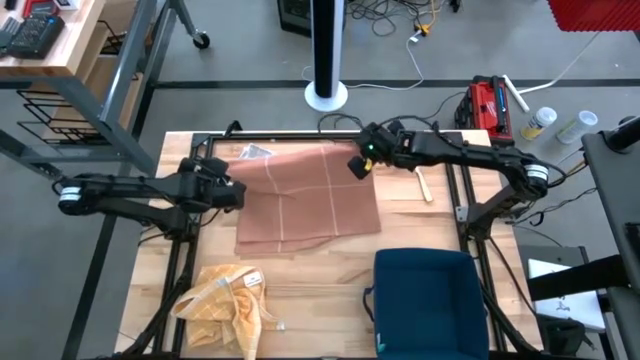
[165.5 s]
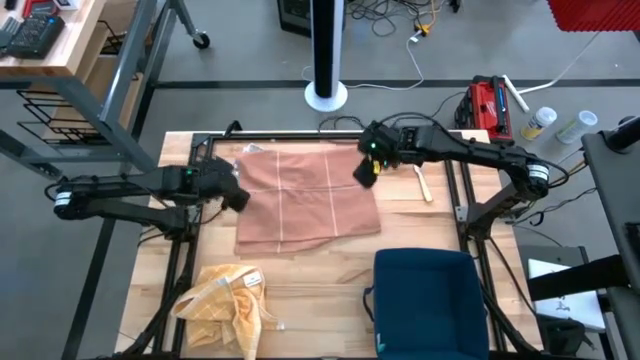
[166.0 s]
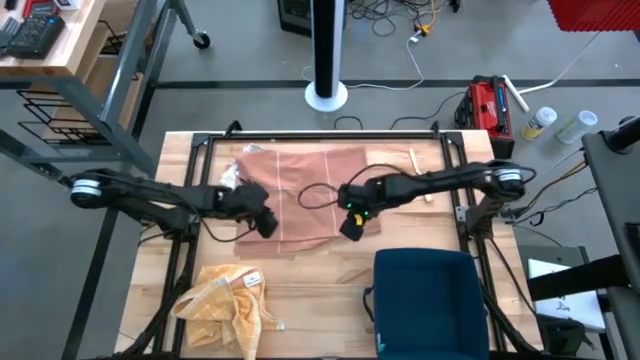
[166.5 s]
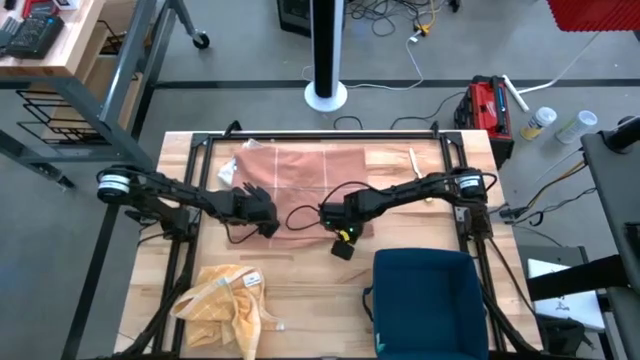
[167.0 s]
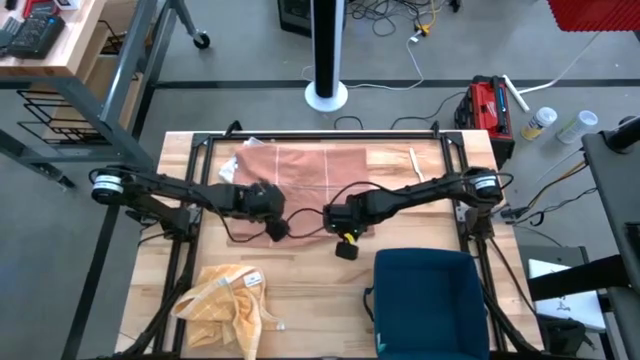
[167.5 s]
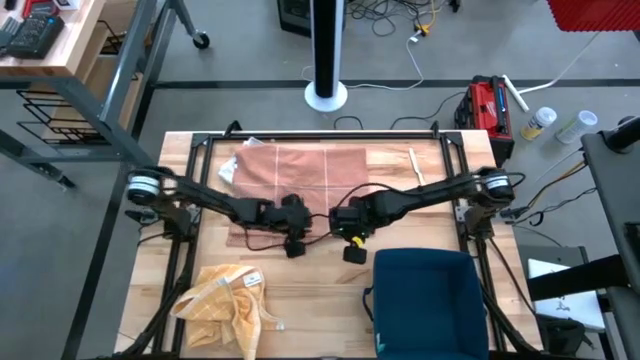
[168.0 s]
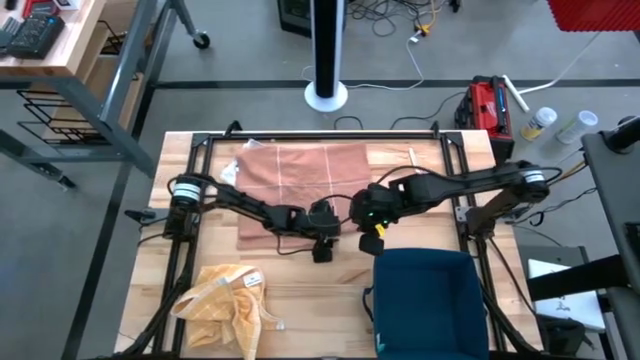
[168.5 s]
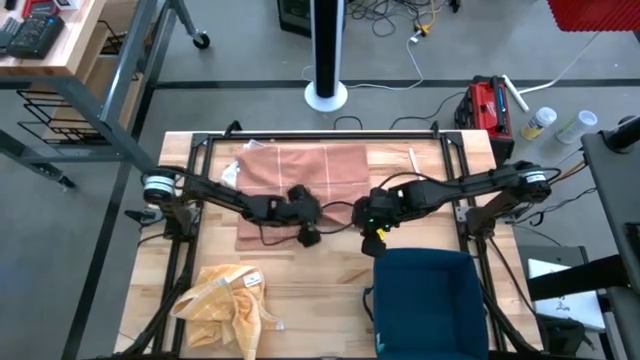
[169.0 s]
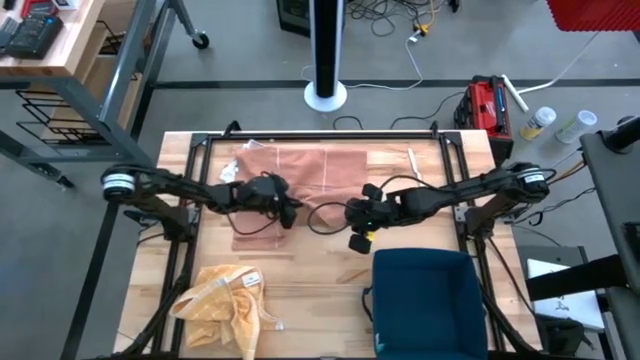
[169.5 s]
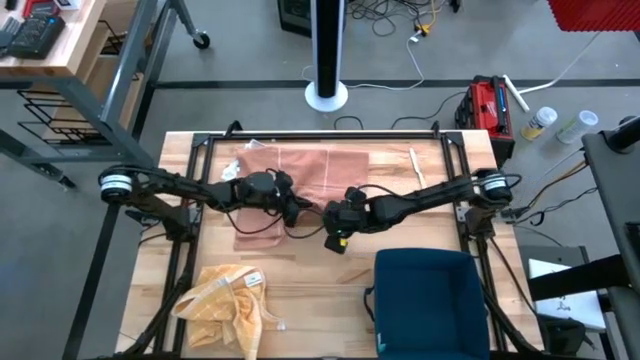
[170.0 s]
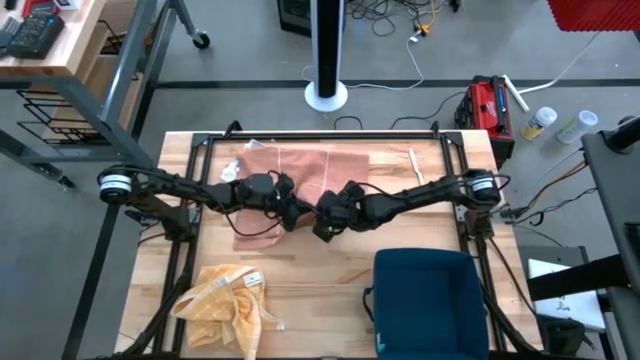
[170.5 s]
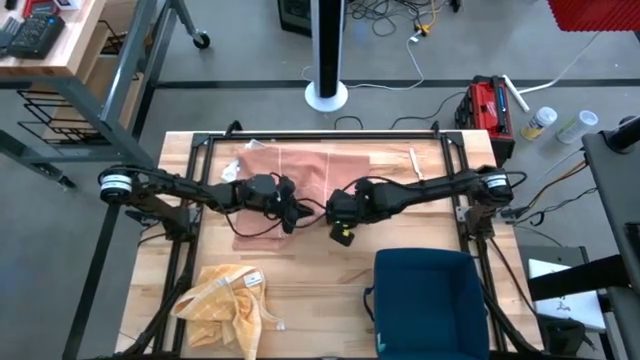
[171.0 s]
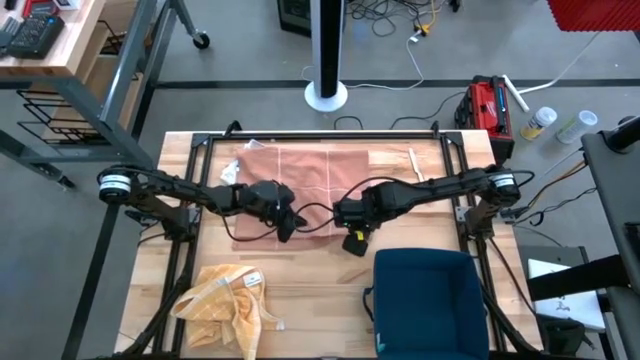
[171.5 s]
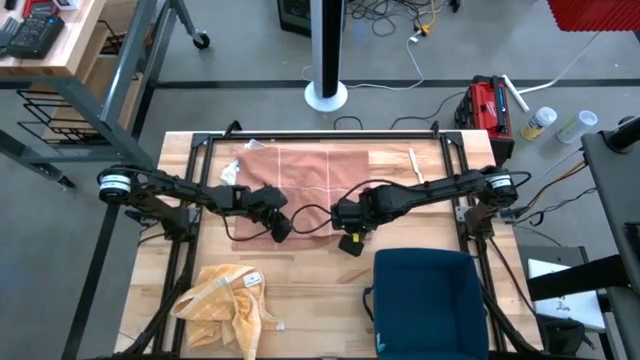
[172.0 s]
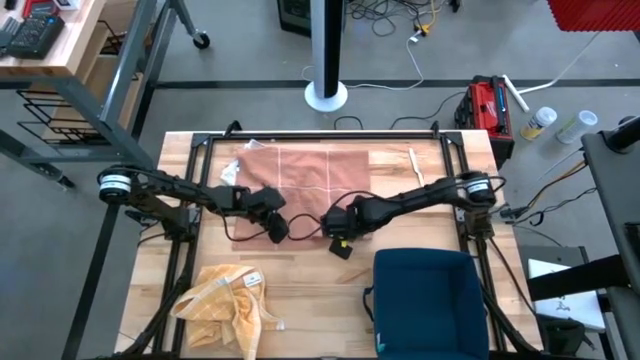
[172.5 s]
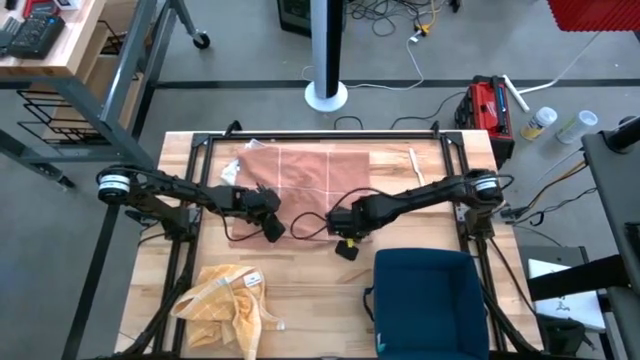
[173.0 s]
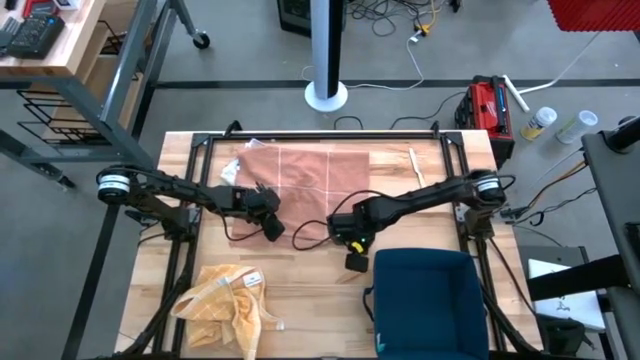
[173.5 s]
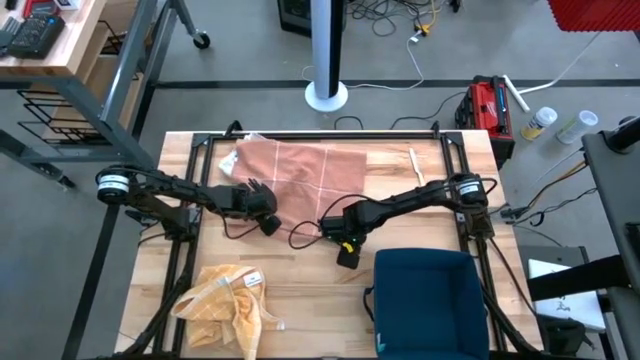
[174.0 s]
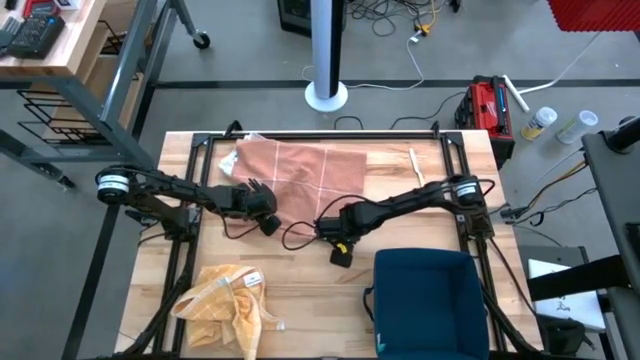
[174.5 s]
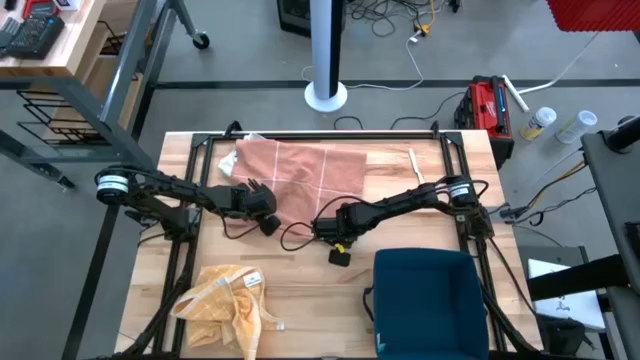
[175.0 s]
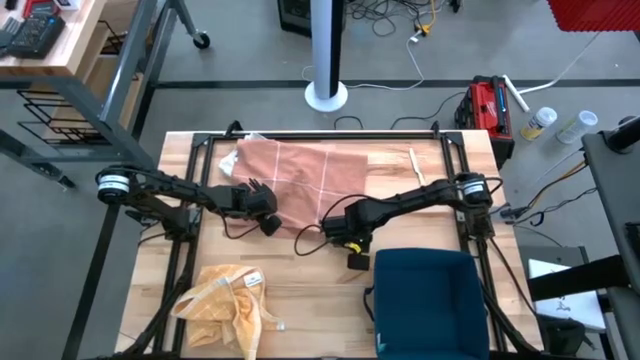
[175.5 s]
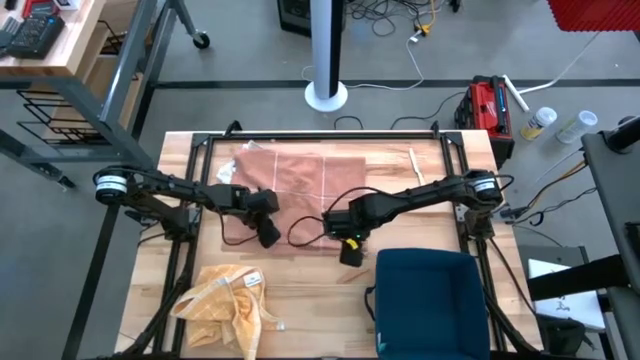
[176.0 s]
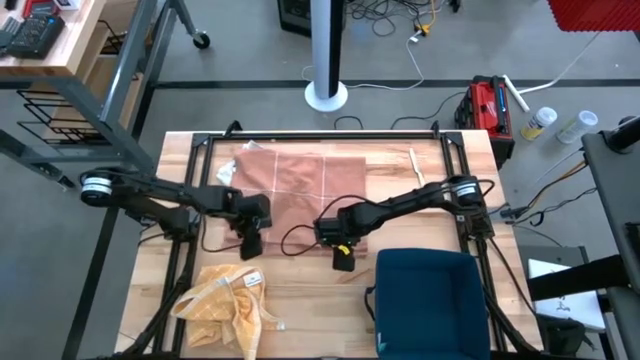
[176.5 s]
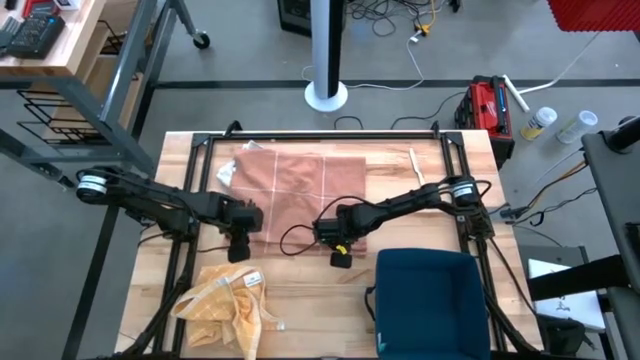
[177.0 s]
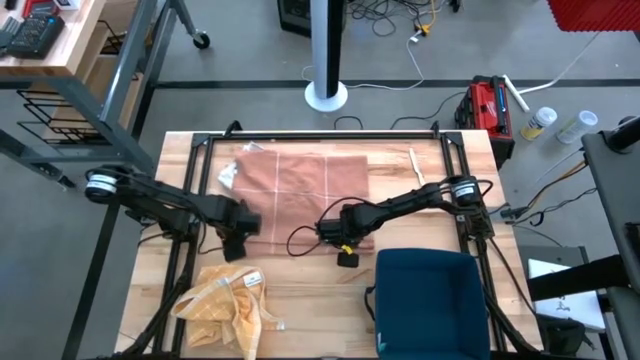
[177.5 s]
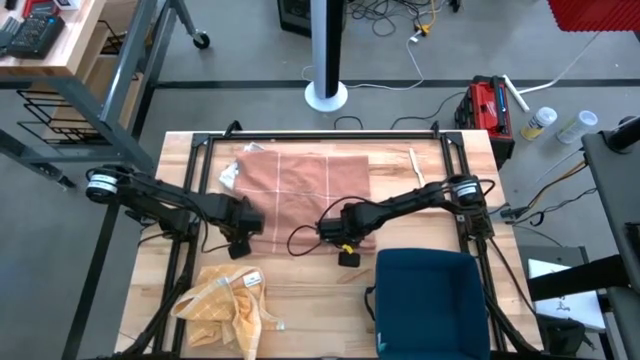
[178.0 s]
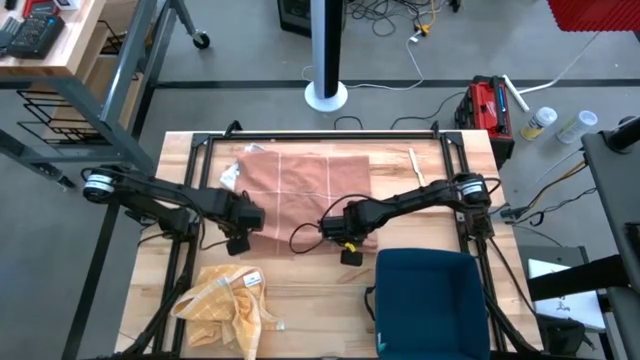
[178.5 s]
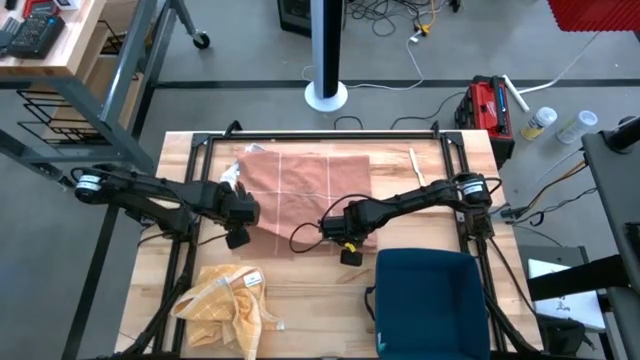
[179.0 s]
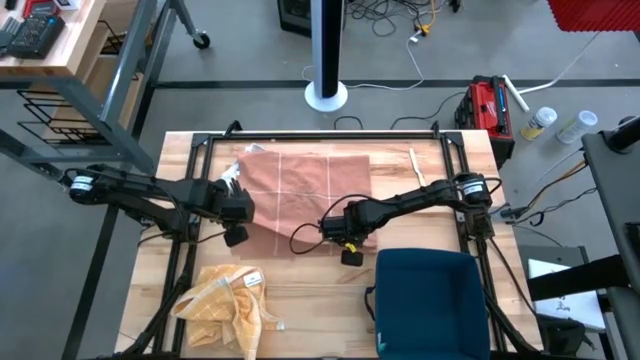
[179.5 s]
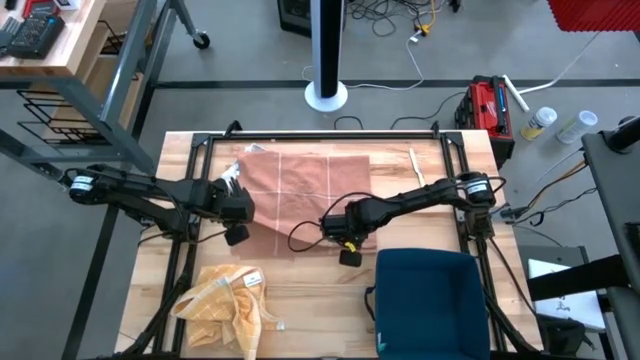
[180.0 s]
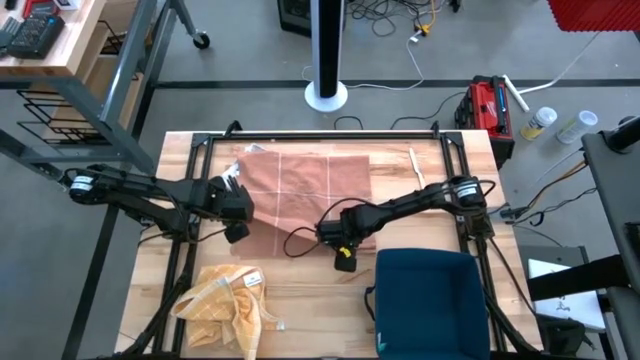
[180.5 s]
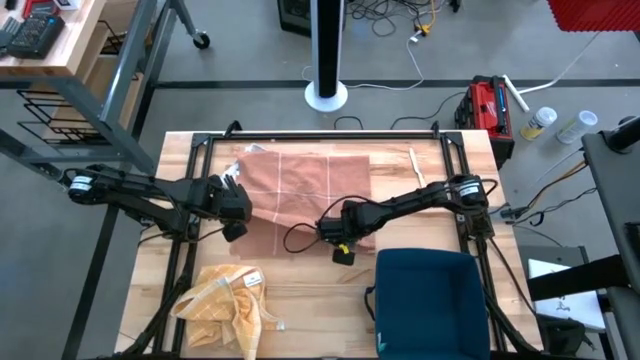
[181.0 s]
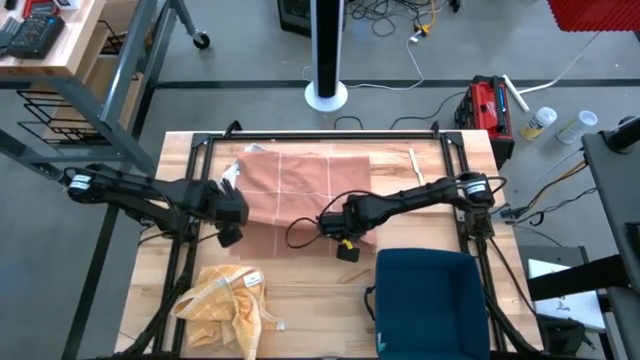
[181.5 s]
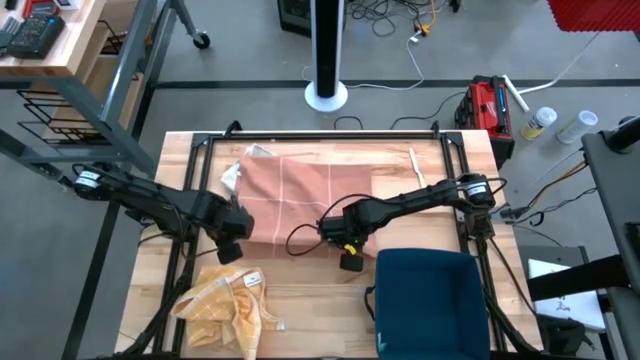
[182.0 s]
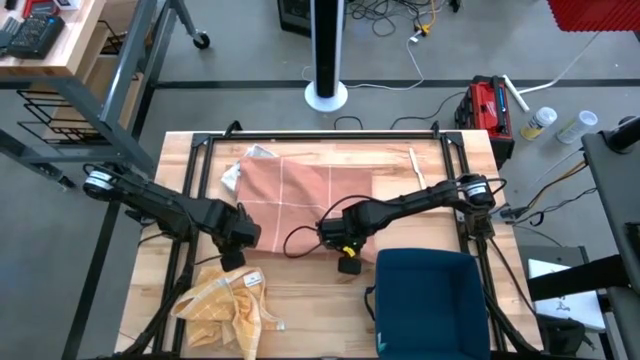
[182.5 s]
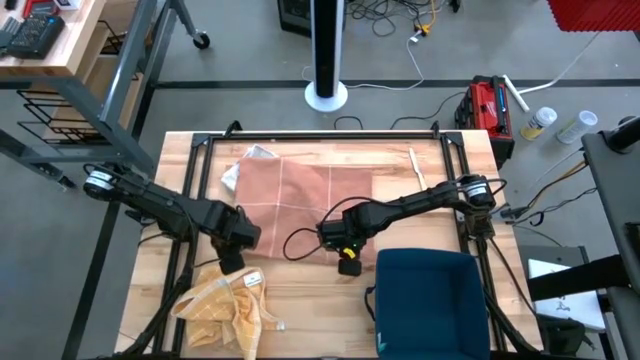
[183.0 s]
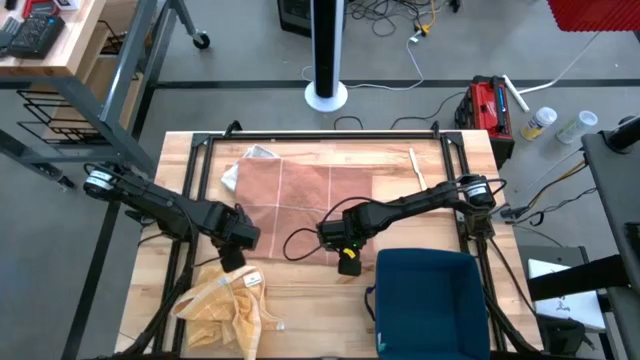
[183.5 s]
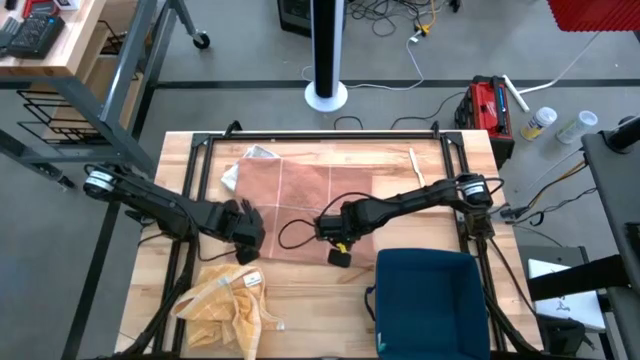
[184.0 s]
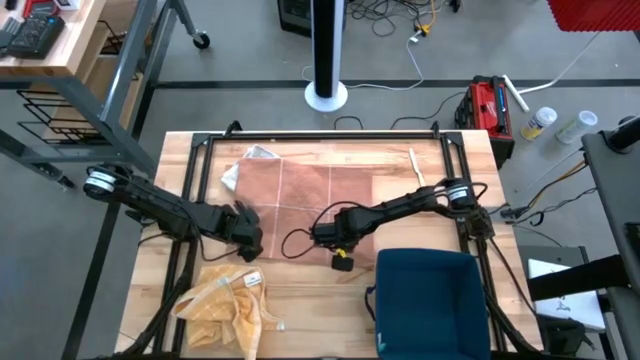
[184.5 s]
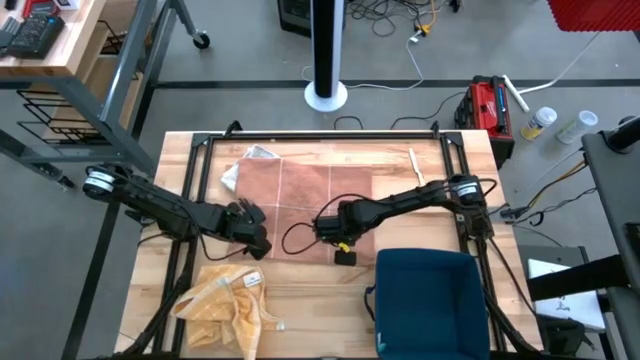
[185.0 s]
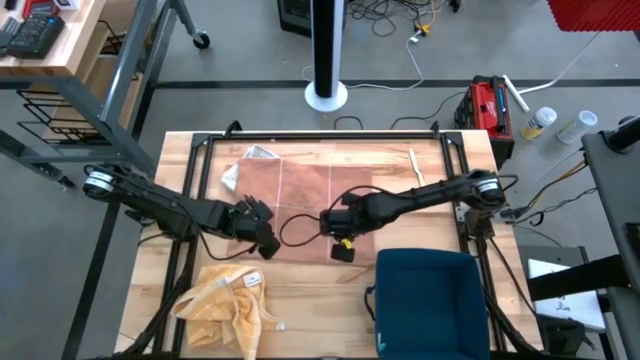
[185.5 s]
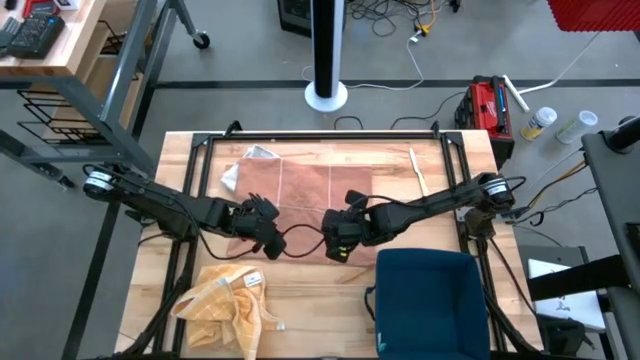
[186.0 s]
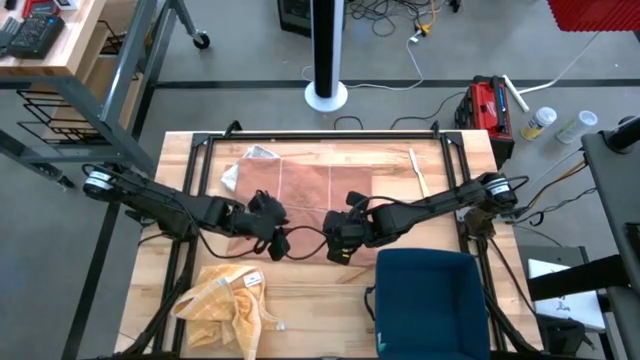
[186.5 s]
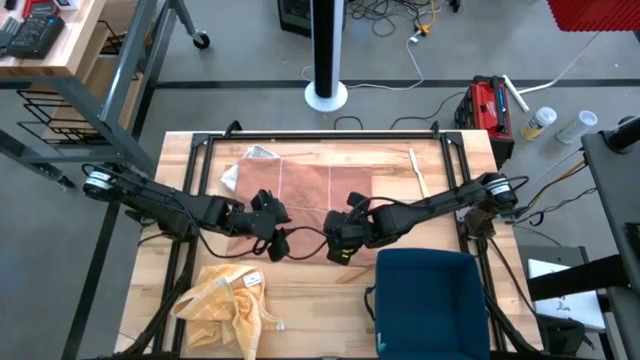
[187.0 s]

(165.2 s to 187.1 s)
Task: Fold towel
Fold the brown towel
